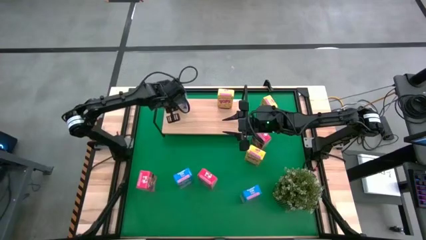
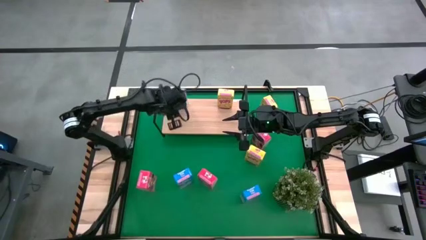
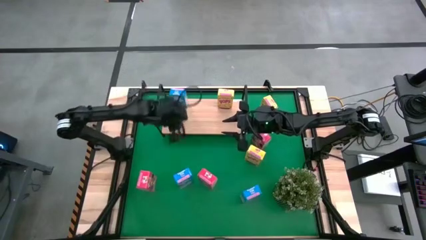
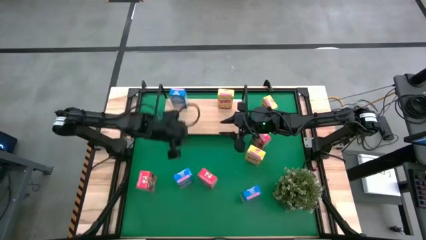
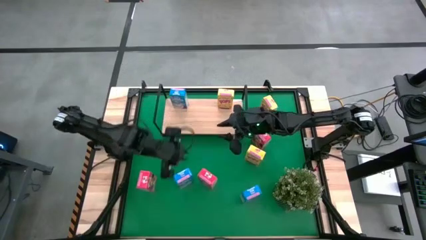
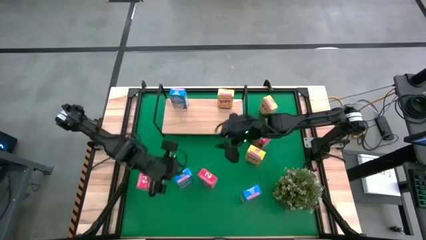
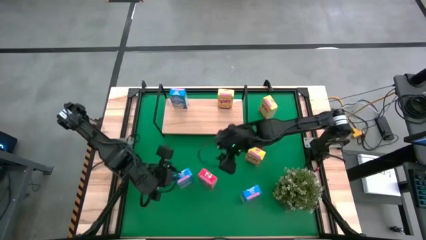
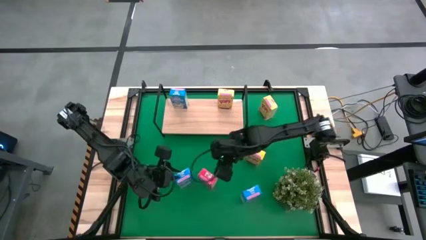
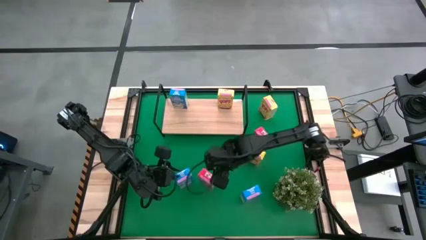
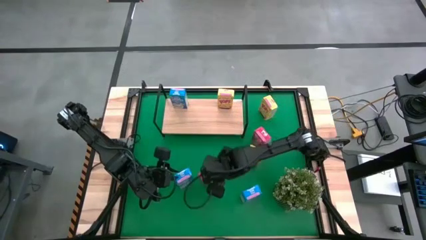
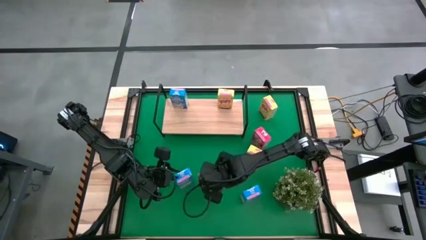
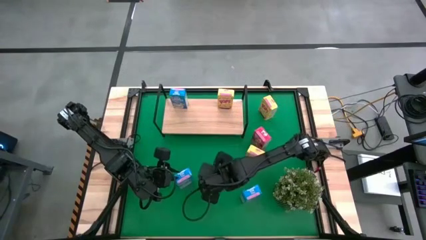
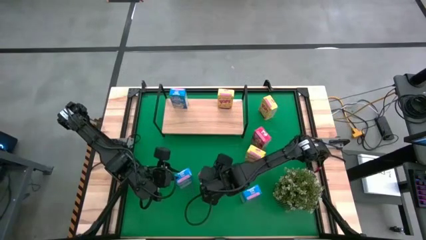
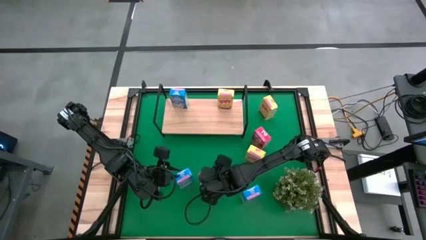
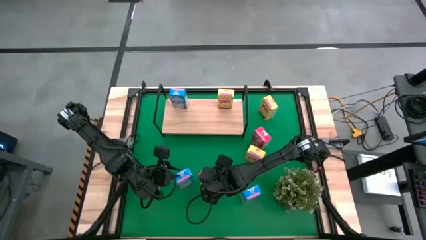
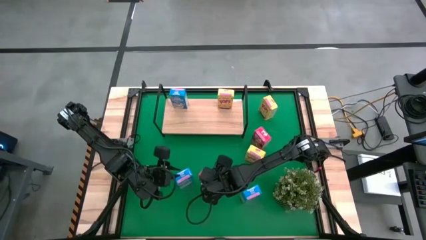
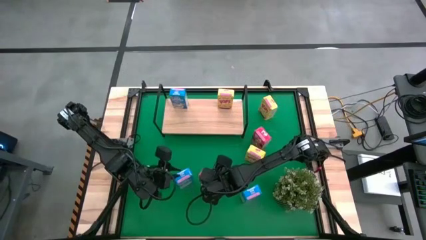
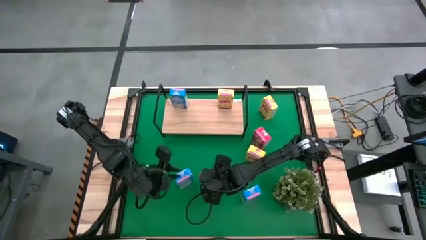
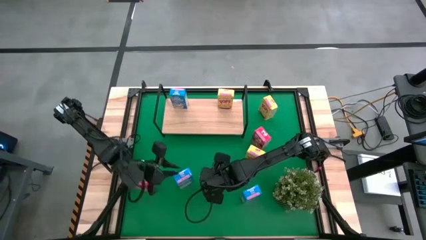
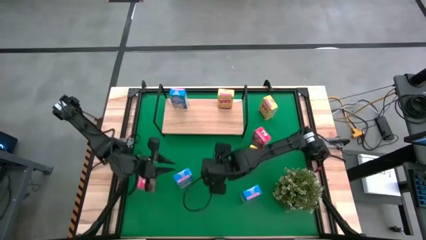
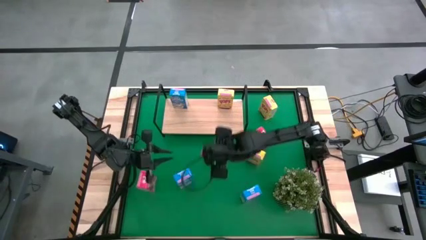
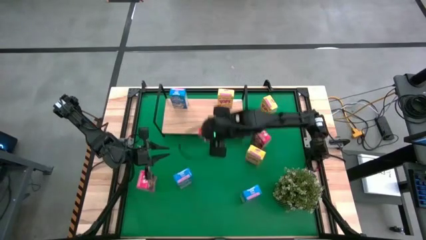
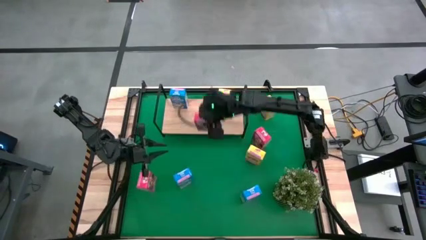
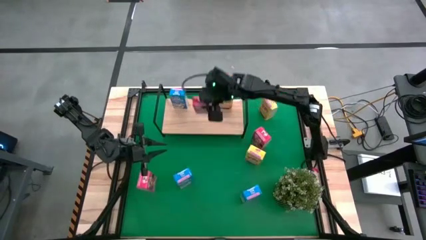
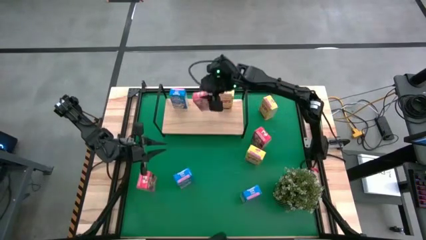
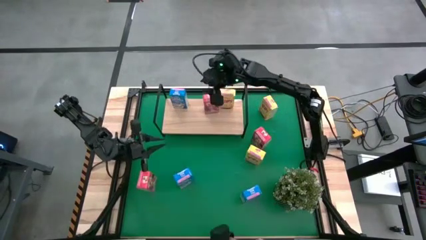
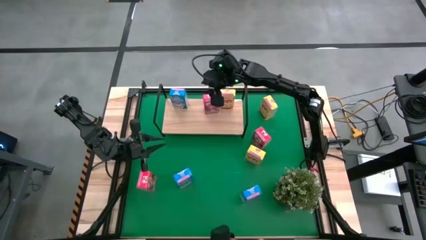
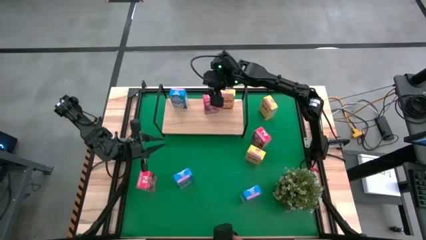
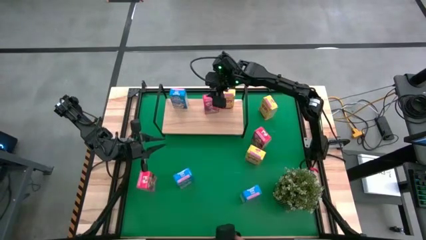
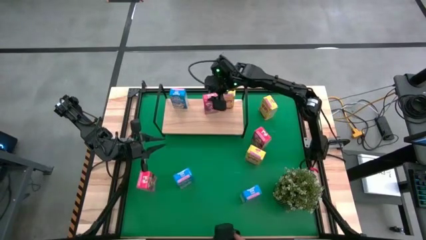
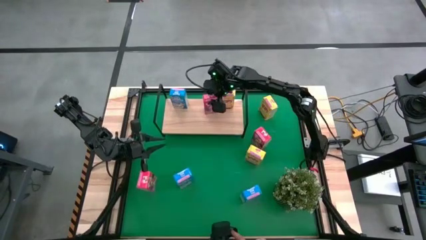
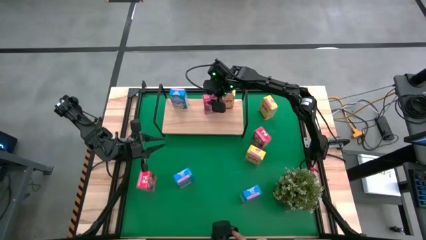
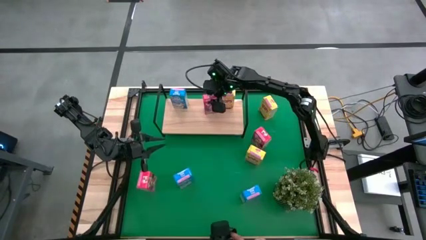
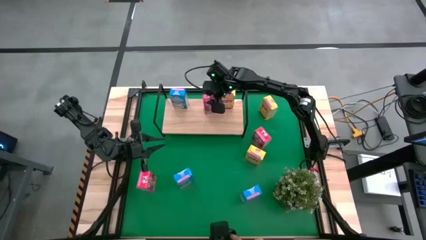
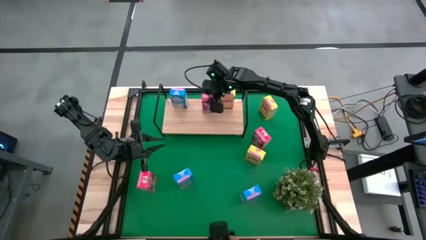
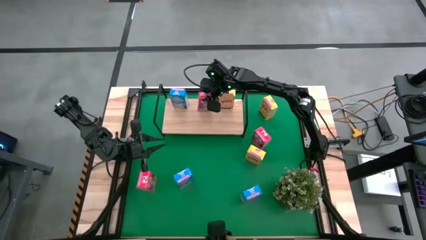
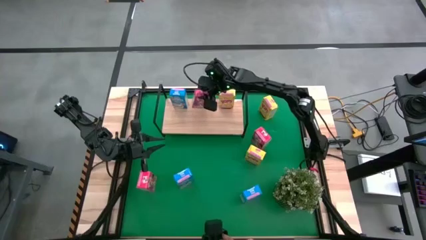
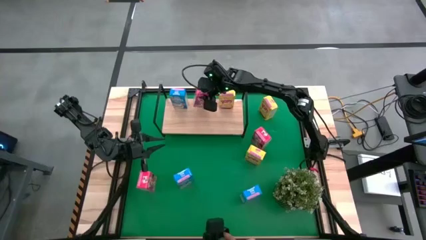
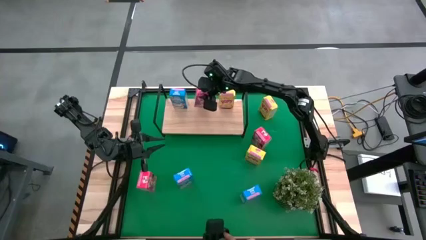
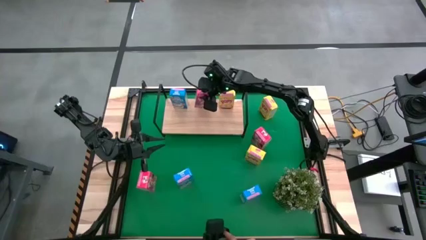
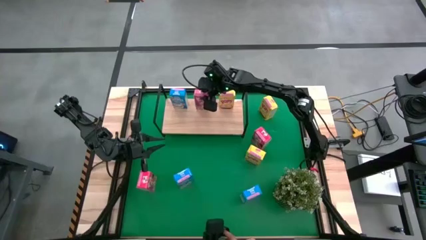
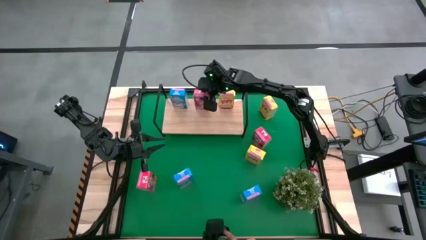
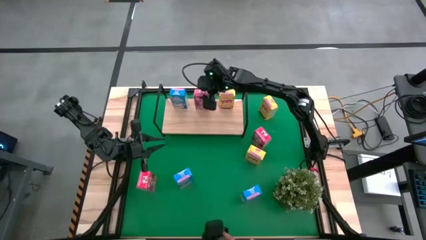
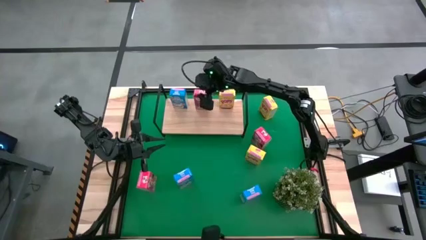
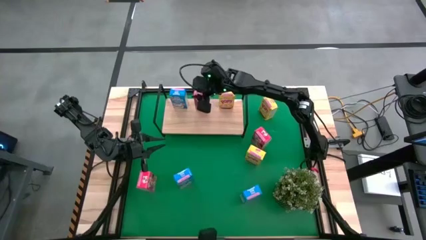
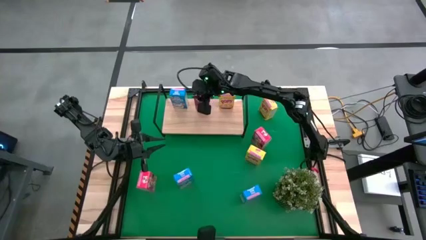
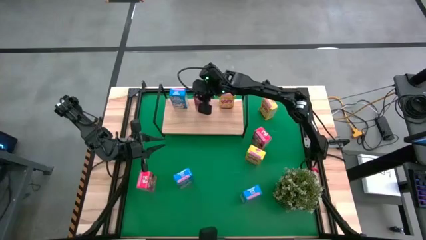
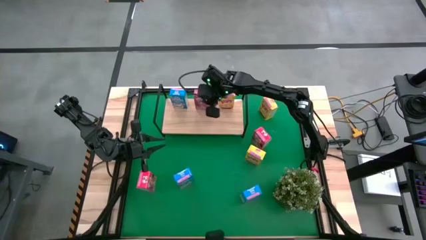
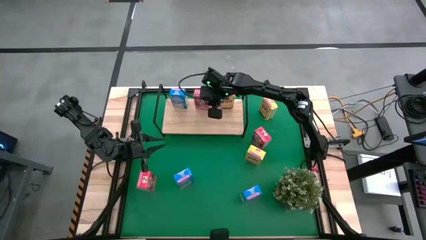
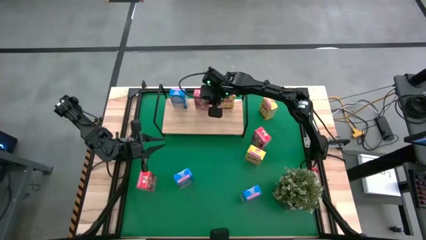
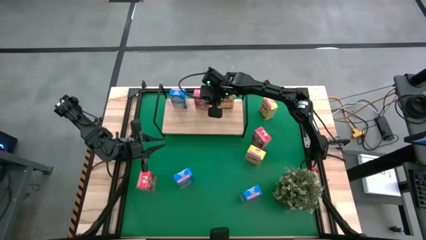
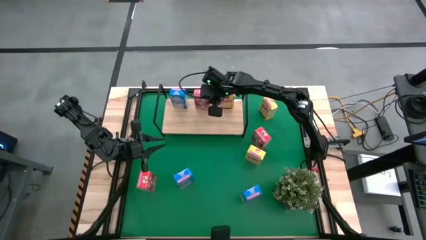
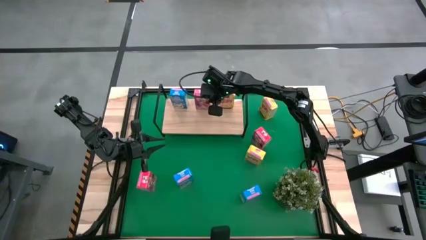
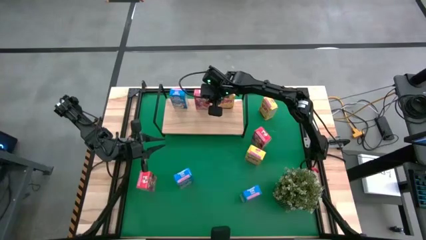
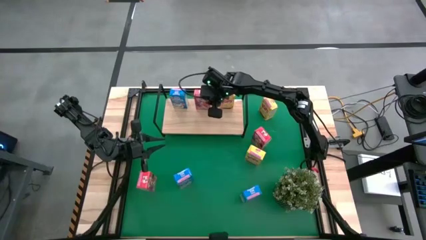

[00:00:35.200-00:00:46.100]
Task: Stack cereal on shelf
Put the bottom right red cereal box on the shelf

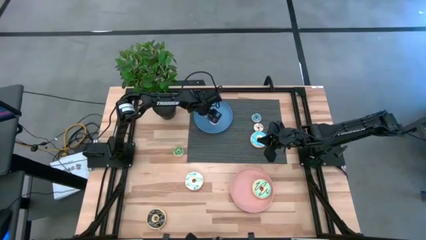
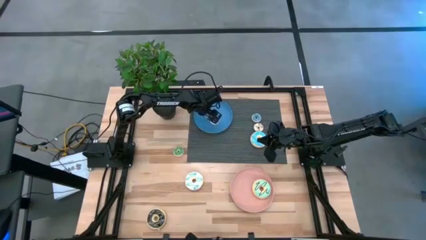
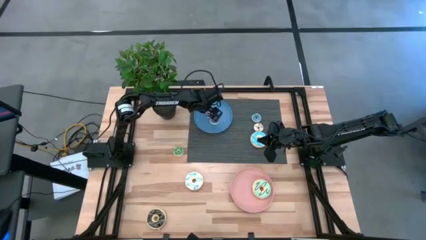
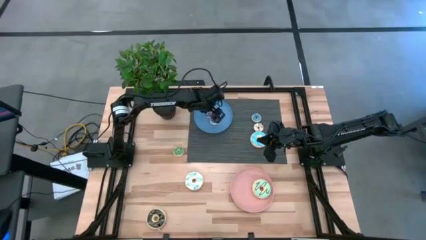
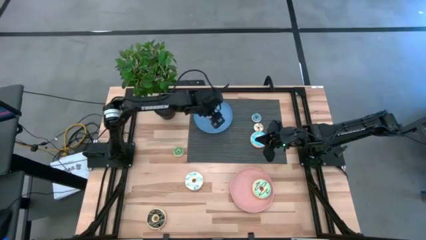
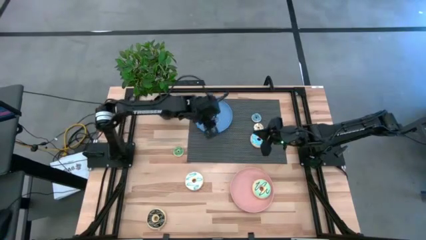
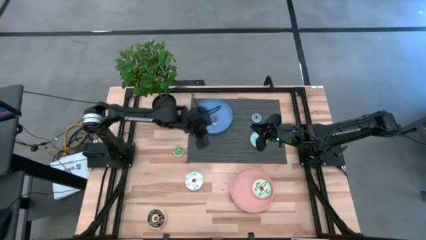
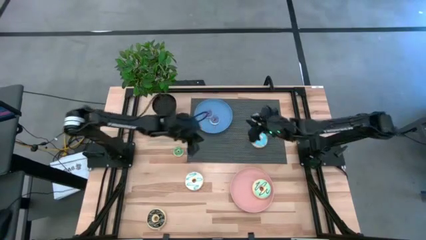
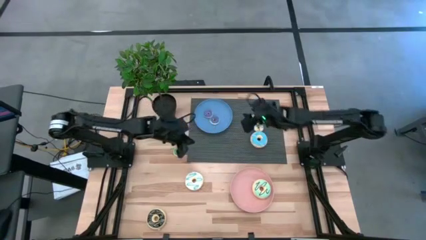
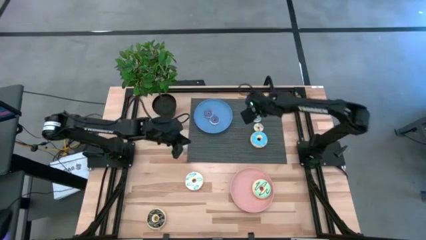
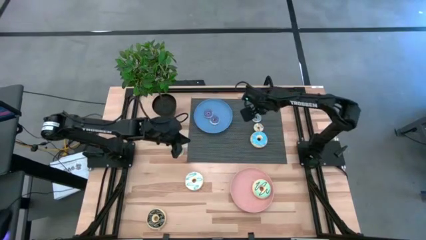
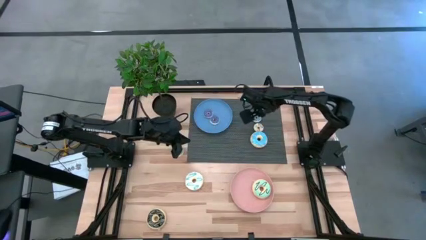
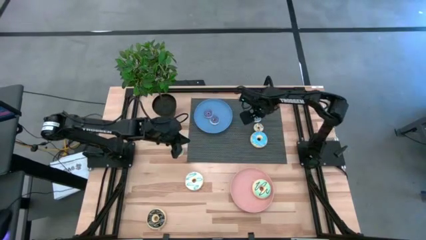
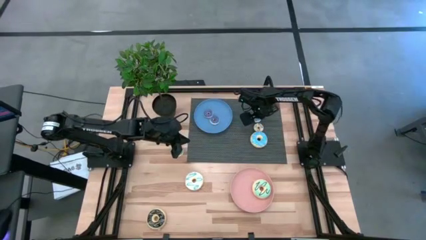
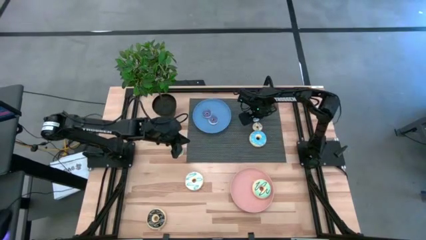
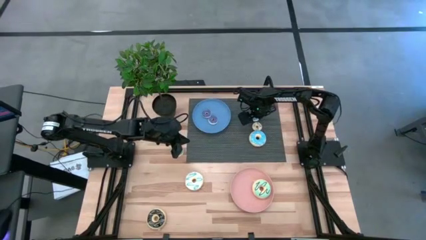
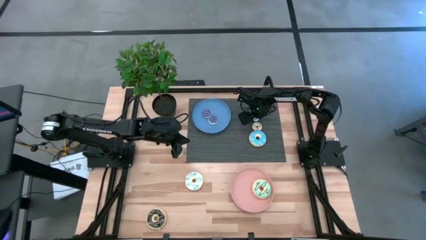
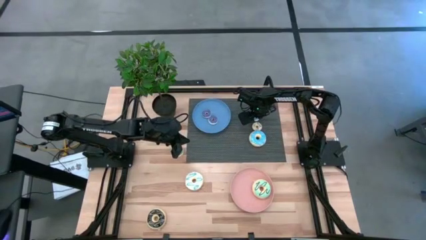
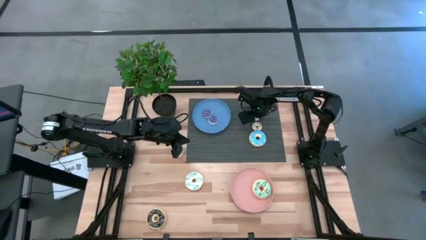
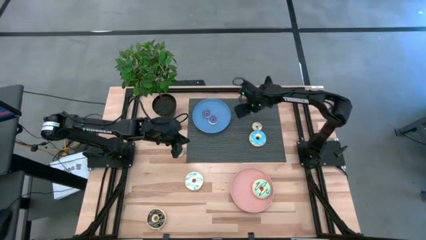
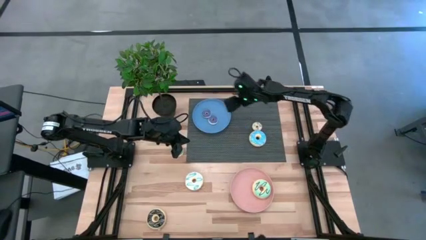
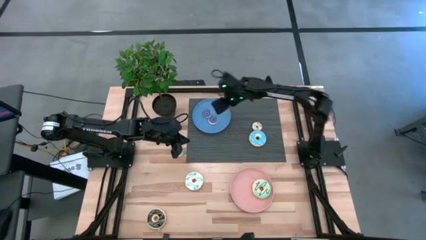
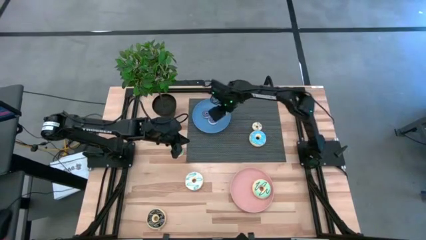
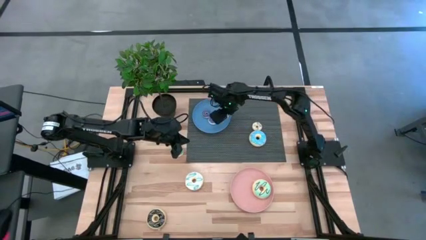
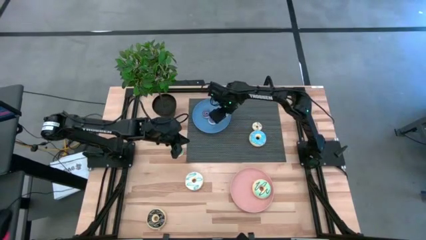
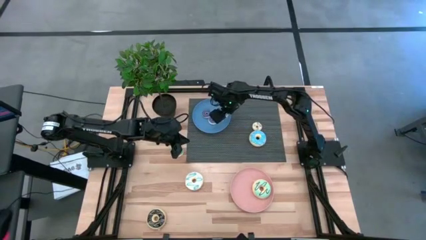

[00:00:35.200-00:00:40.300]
Task: Pick & Place donuts
Put the small light blue donut into the blue plate
